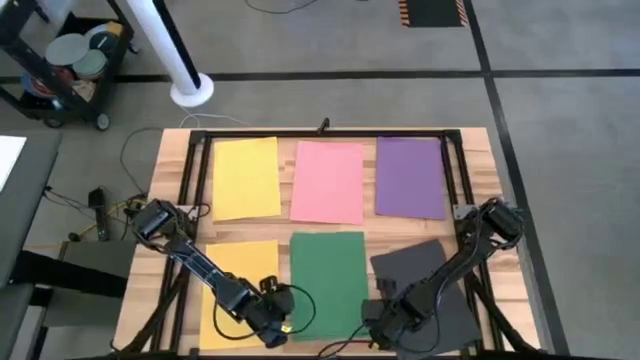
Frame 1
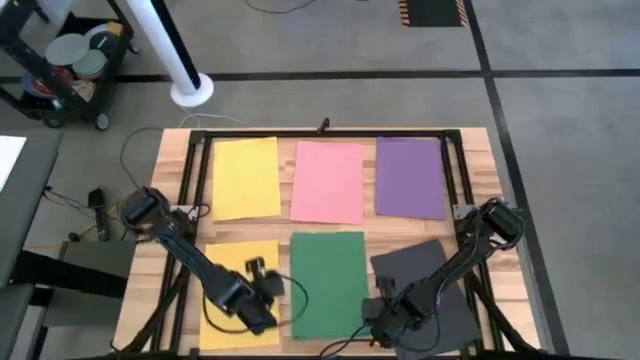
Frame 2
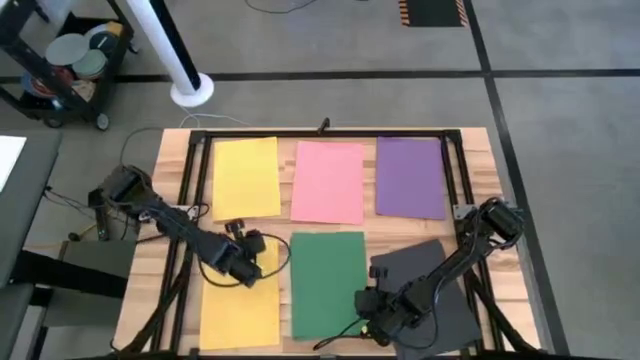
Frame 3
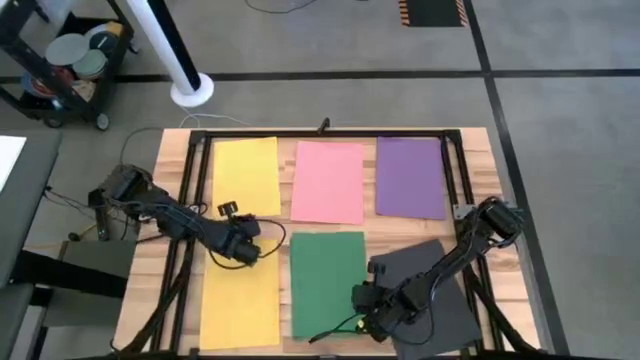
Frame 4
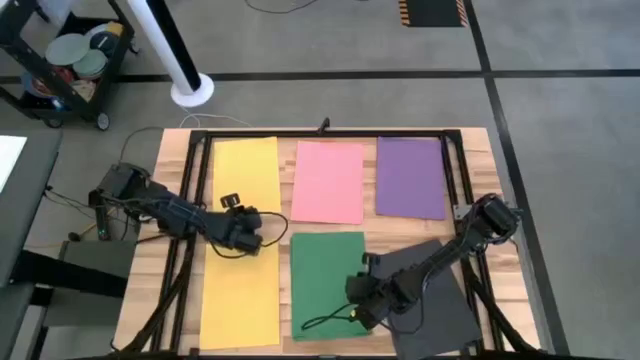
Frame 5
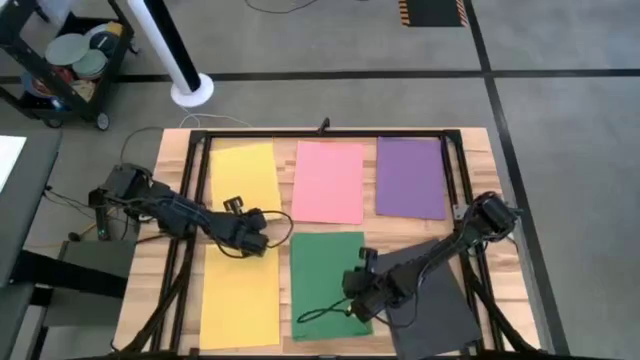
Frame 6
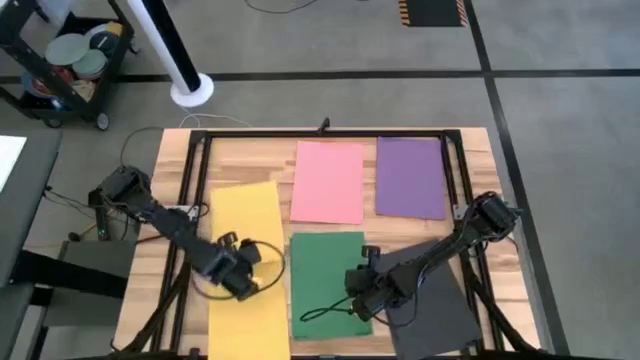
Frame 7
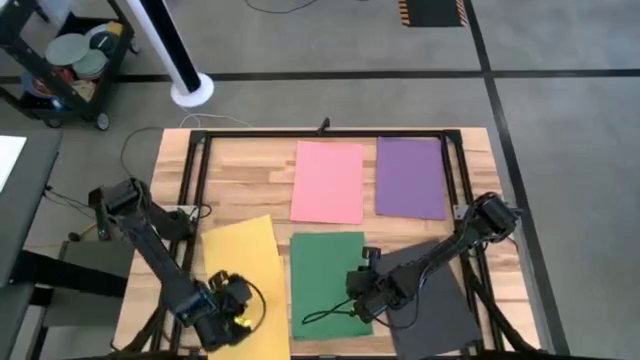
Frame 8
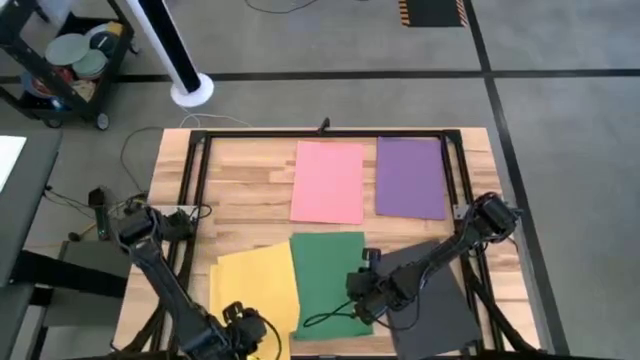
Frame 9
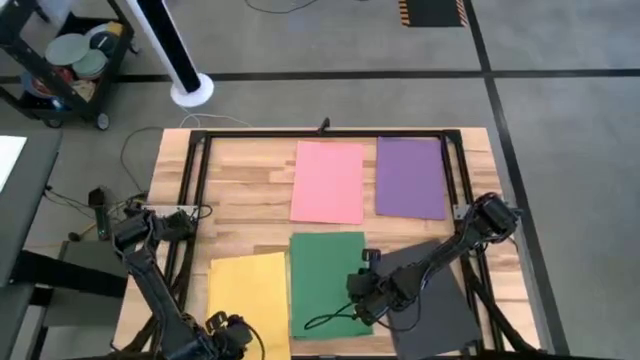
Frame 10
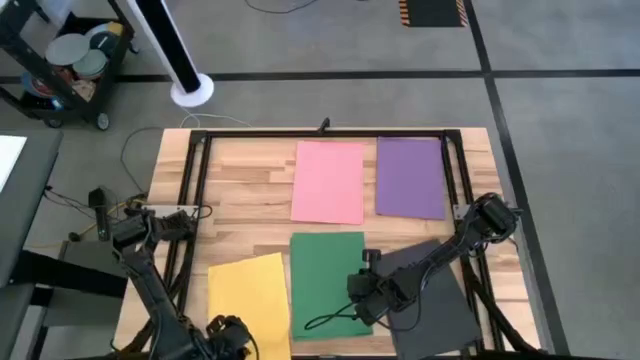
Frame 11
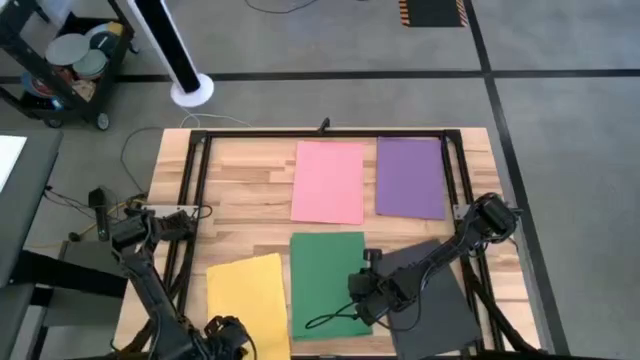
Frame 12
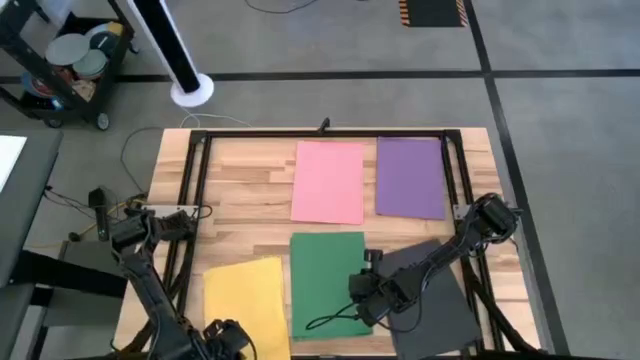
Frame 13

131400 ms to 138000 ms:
Task: Organize paper
Stack the top yellow paper on top of the yellow paper

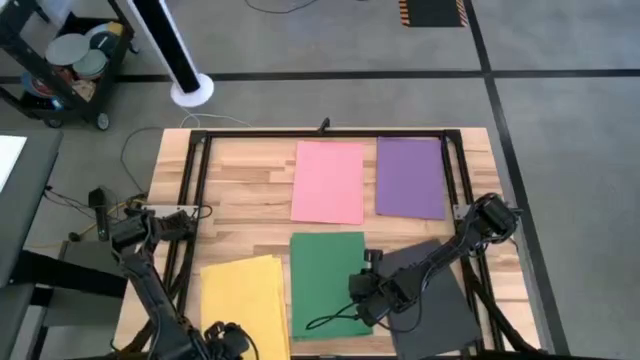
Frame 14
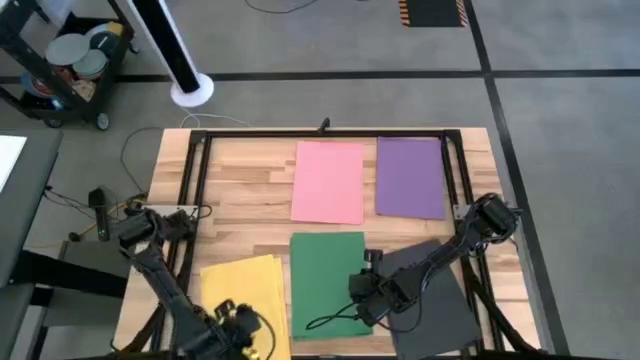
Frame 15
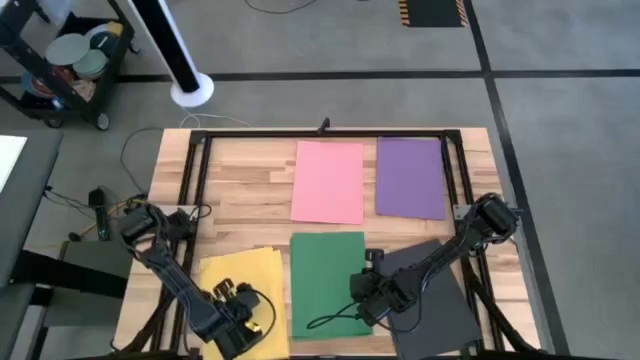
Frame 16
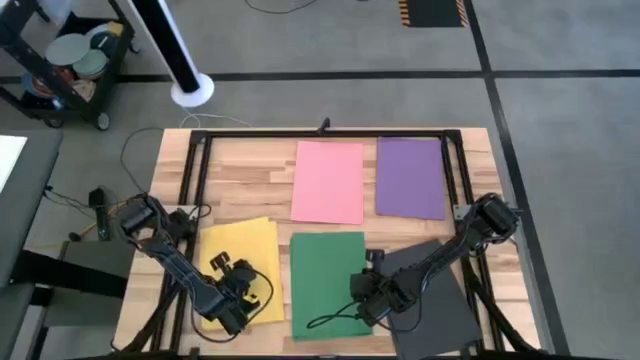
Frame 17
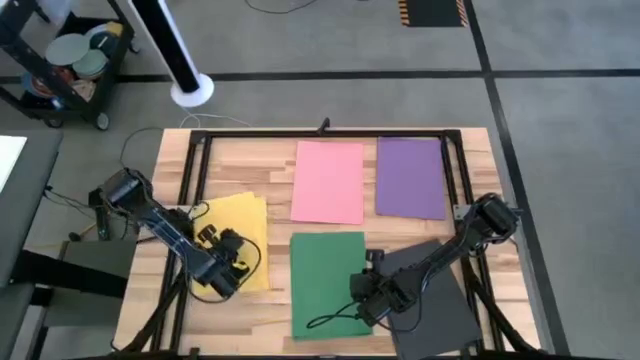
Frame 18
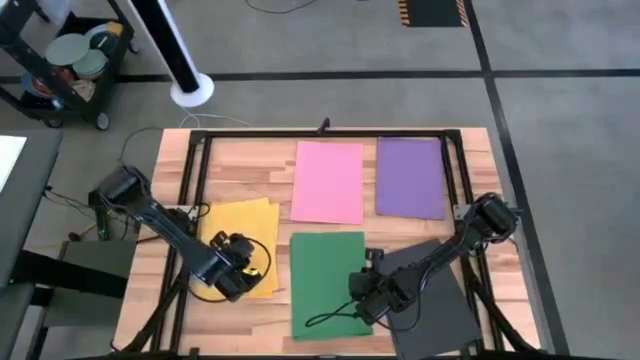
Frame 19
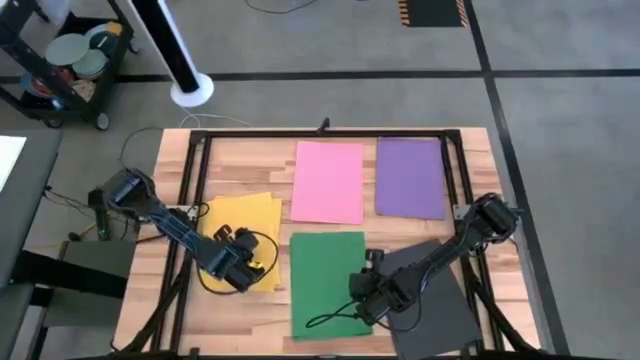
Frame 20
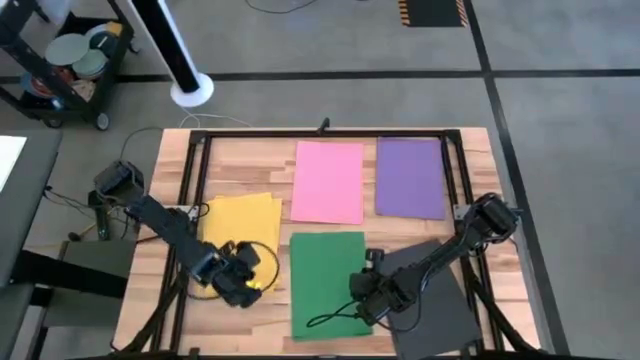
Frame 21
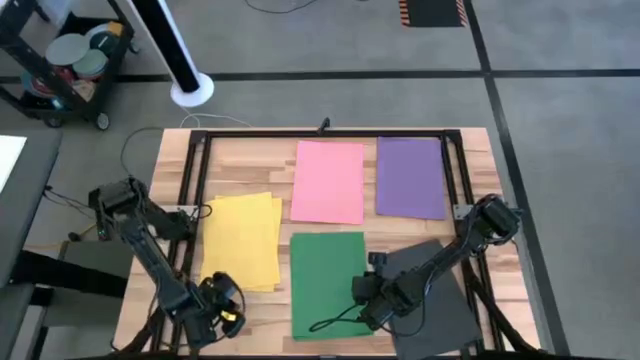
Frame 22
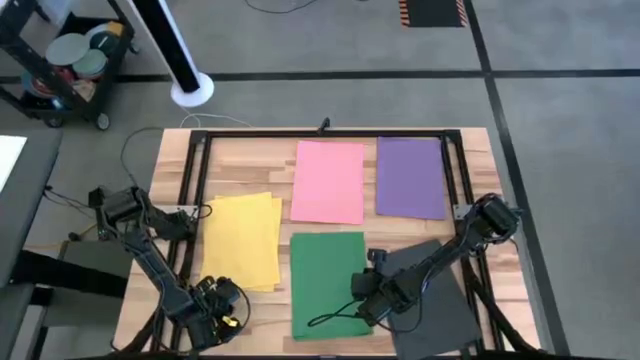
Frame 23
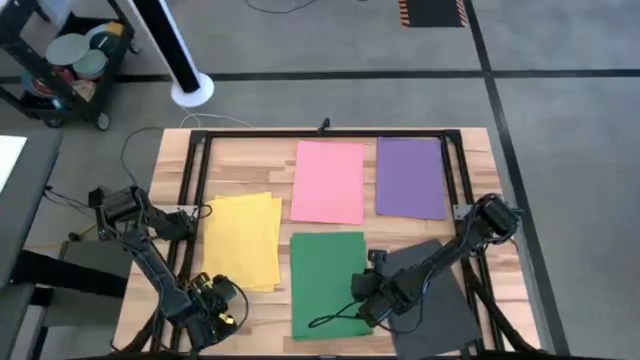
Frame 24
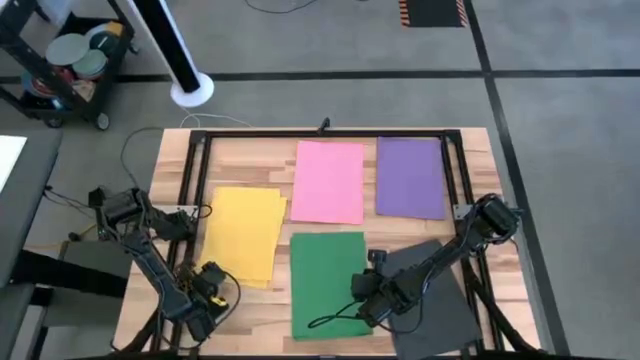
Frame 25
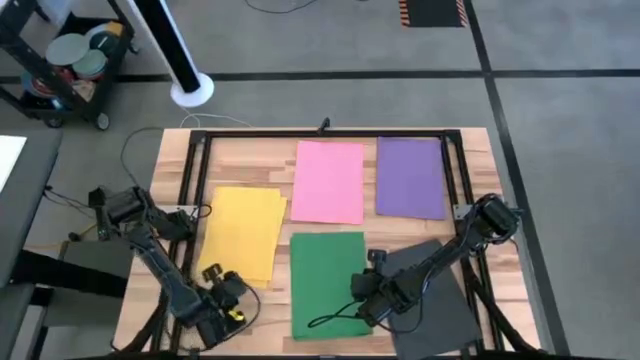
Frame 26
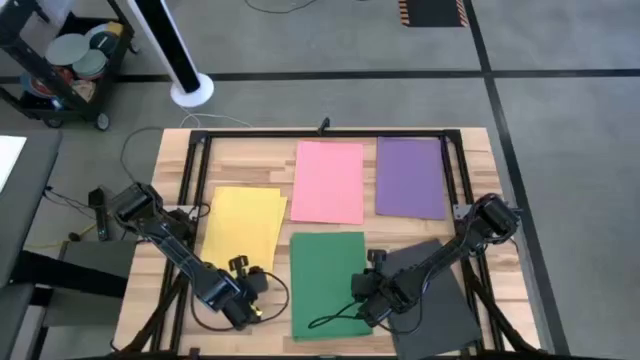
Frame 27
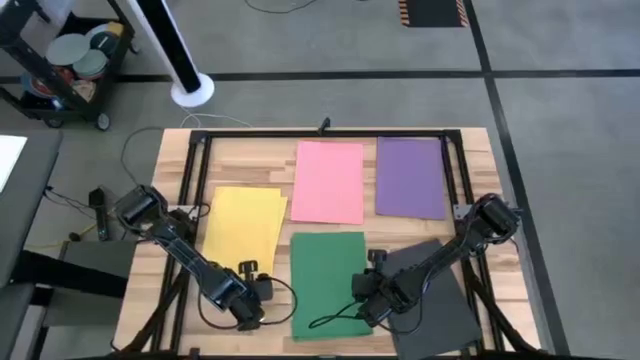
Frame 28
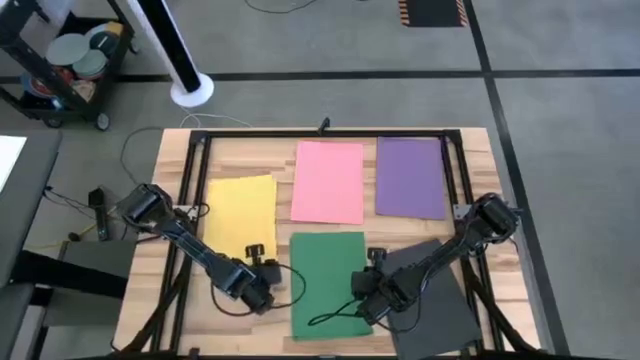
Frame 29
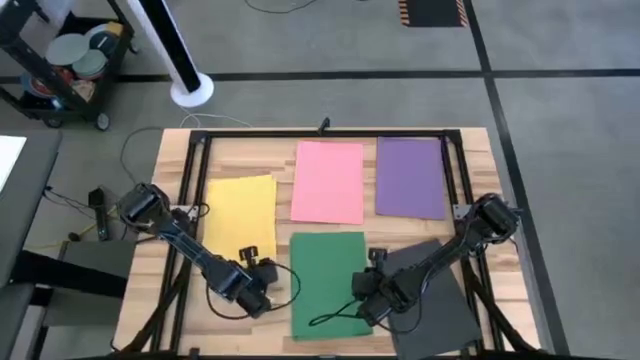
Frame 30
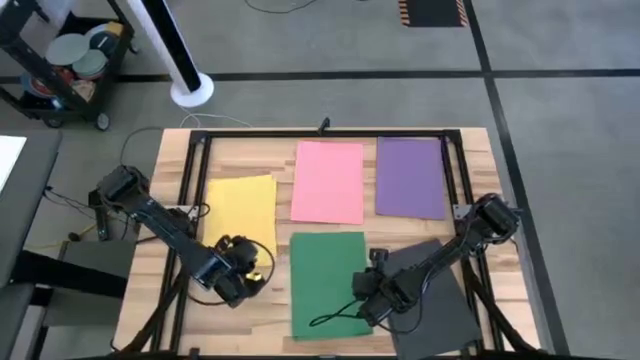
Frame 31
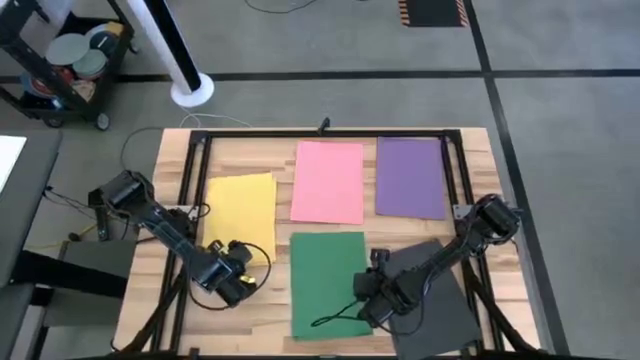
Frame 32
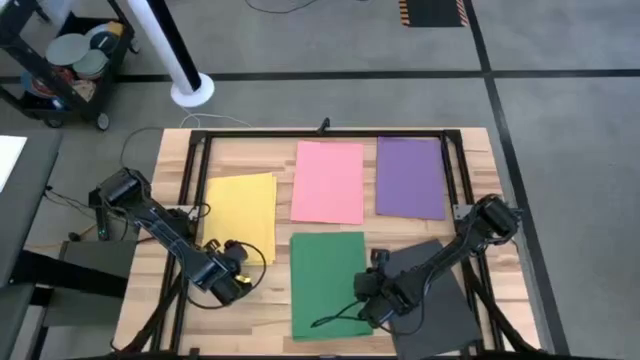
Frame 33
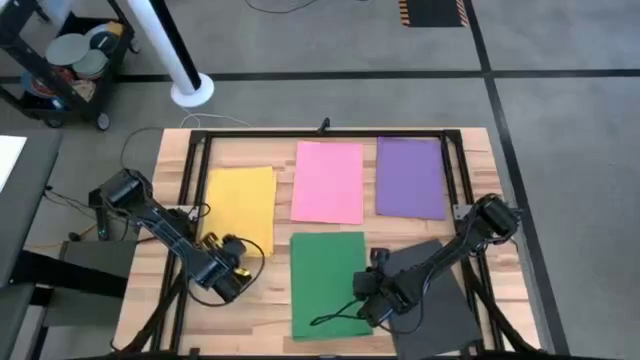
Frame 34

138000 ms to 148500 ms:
Move the stacked yellow papers to the top left of the table

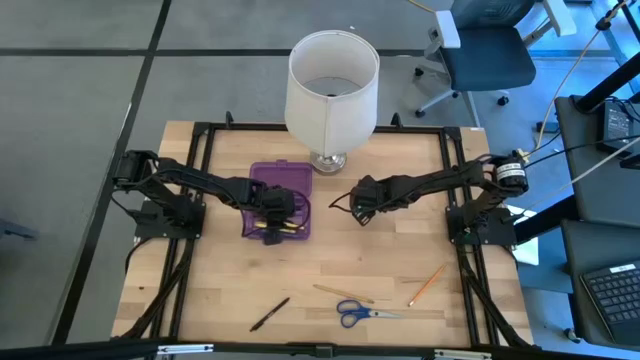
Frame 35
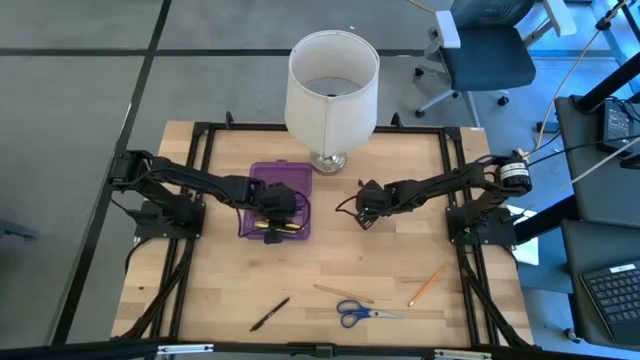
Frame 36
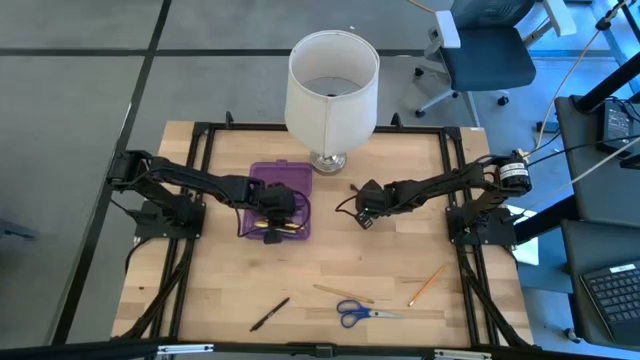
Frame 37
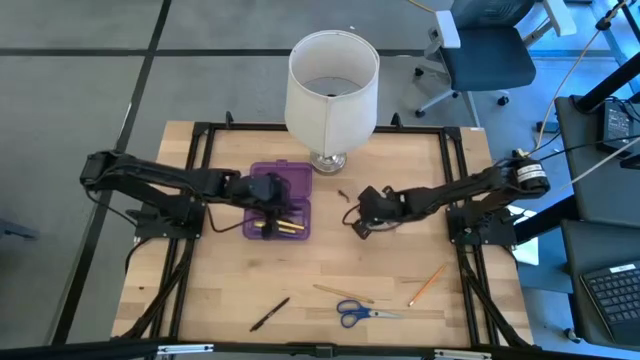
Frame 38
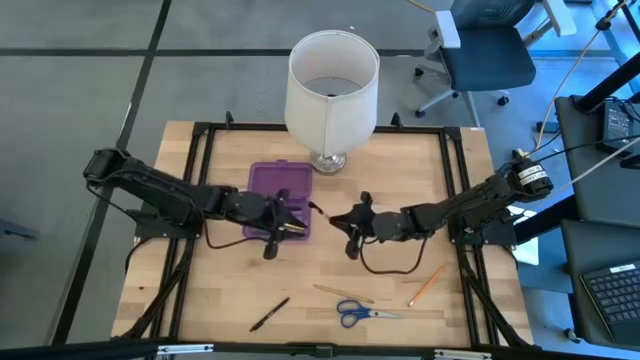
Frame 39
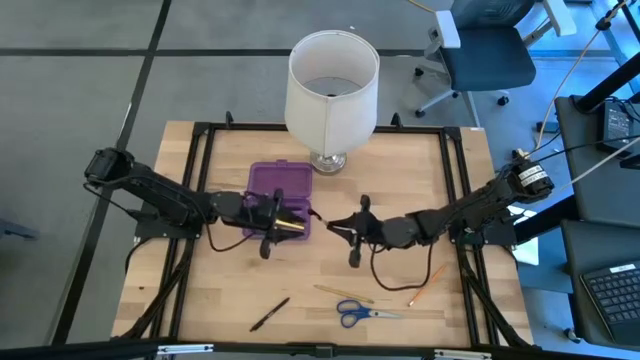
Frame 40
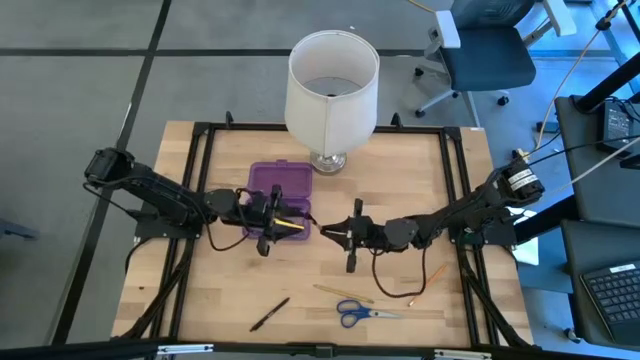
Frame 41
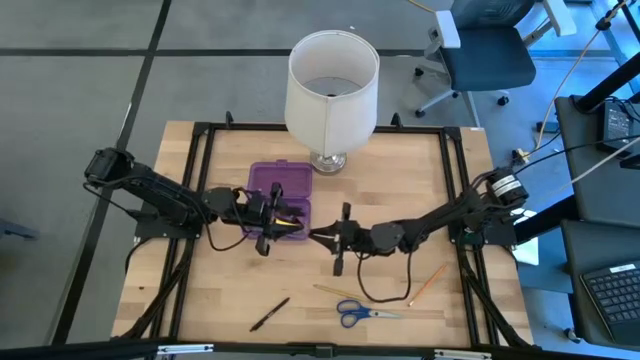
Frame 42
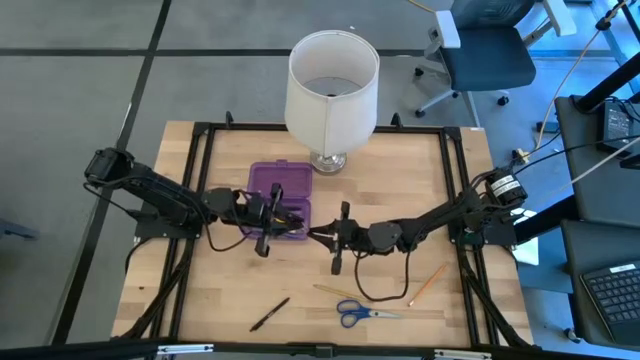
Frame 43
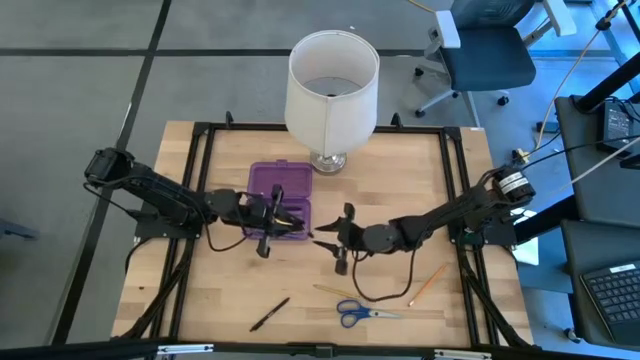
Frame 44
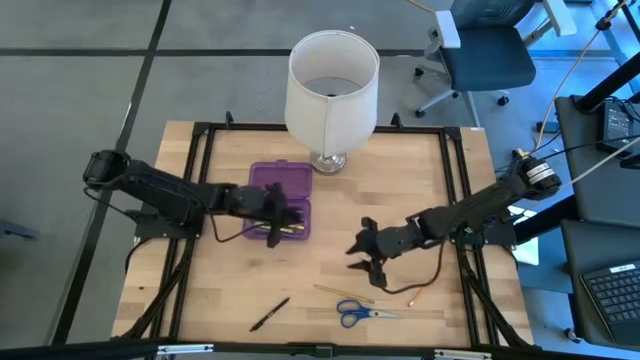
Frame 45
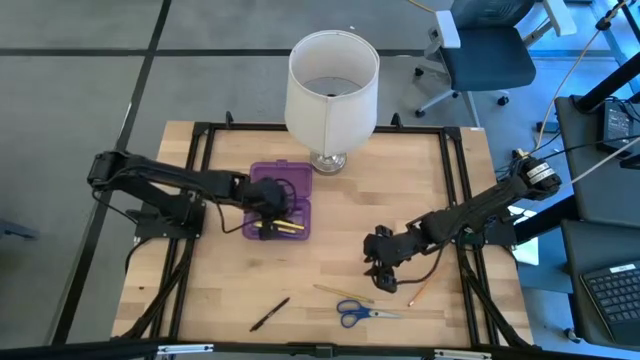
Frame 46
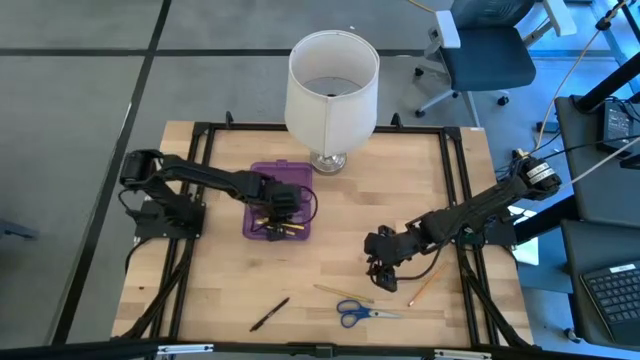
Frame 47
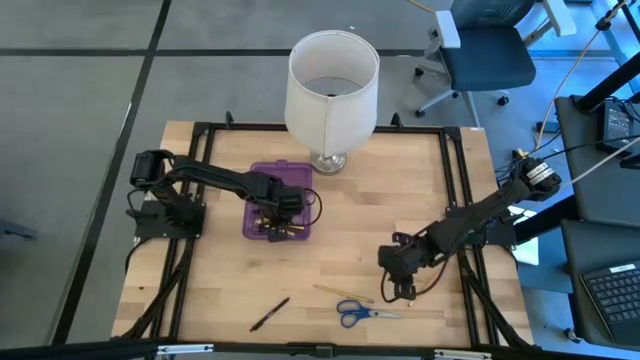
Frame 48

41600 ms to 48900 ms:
Task: Pick & place school supplies into a supply box
Put the black pen into the purple supply box
